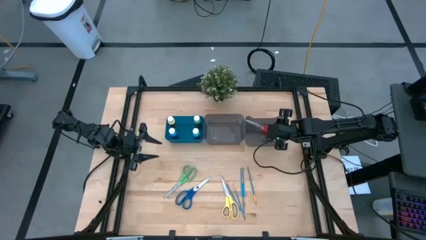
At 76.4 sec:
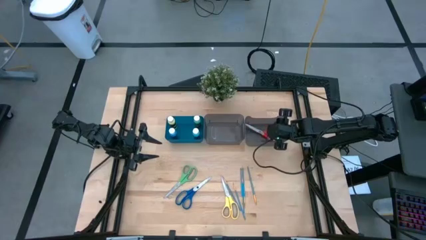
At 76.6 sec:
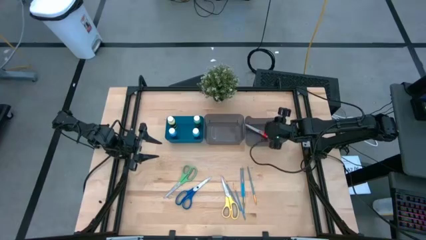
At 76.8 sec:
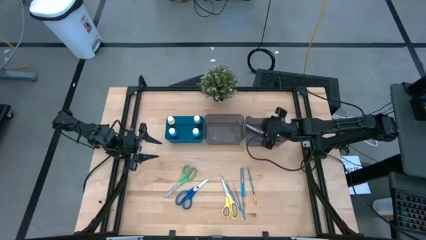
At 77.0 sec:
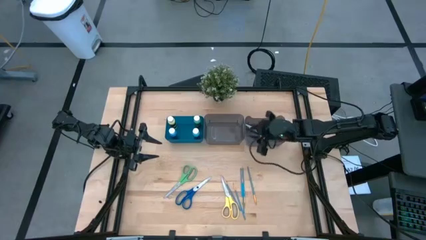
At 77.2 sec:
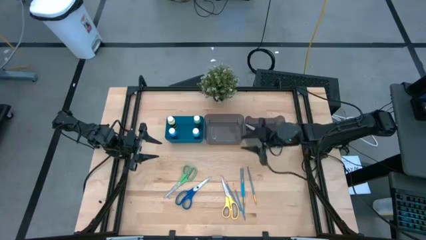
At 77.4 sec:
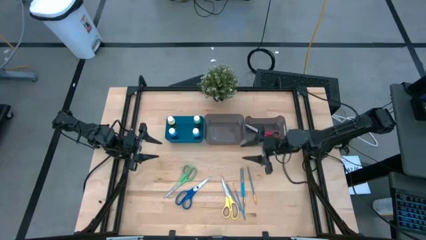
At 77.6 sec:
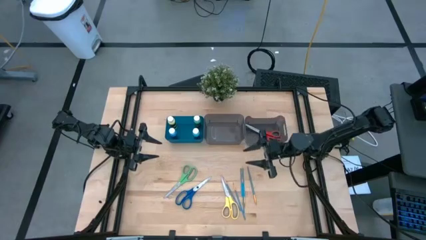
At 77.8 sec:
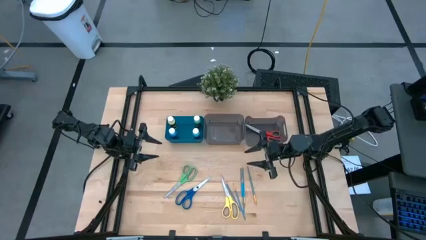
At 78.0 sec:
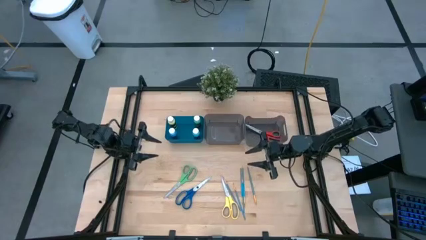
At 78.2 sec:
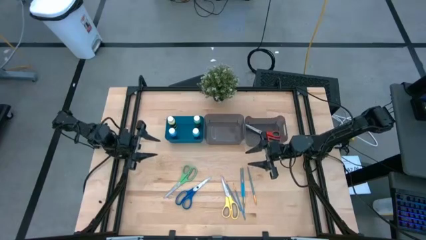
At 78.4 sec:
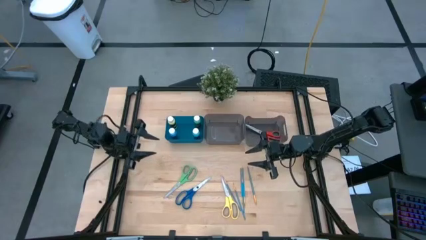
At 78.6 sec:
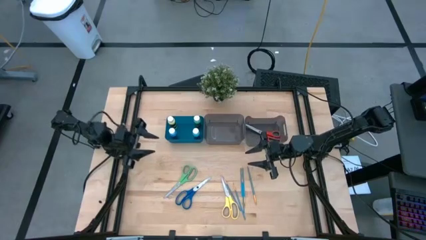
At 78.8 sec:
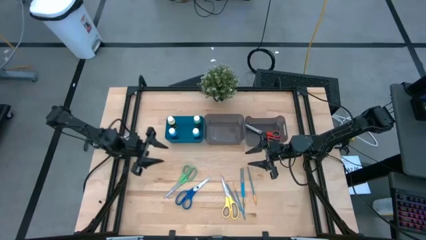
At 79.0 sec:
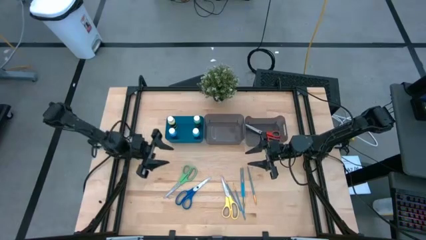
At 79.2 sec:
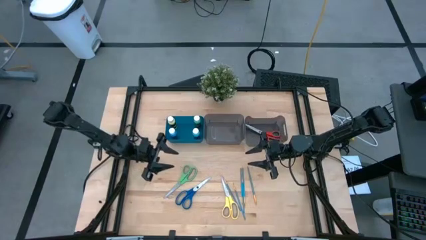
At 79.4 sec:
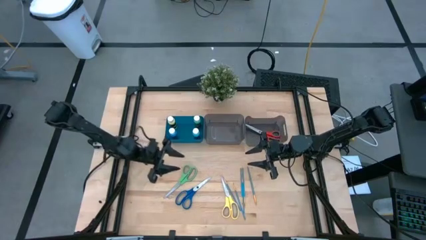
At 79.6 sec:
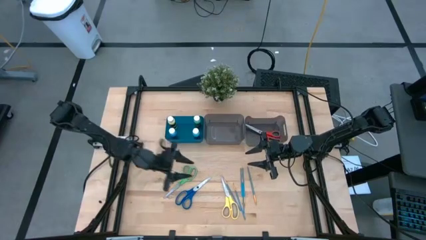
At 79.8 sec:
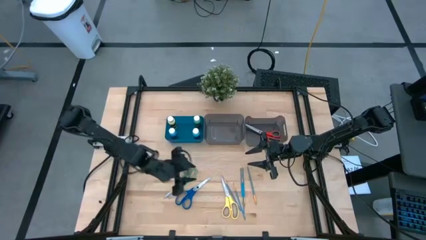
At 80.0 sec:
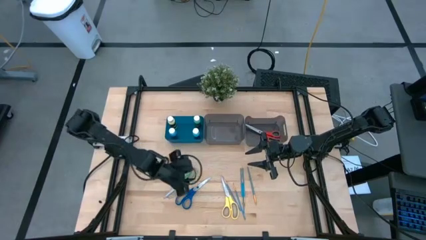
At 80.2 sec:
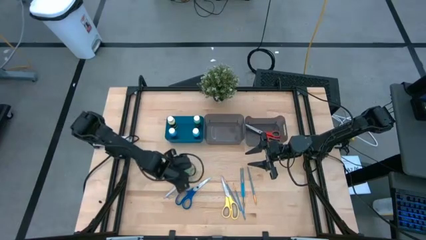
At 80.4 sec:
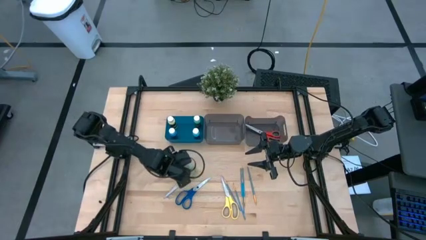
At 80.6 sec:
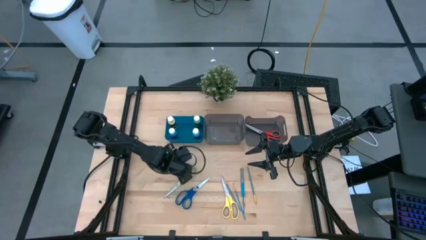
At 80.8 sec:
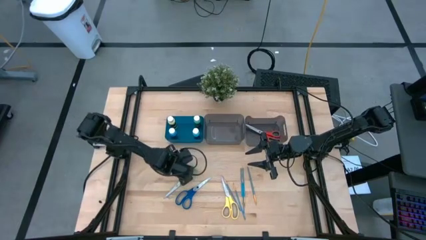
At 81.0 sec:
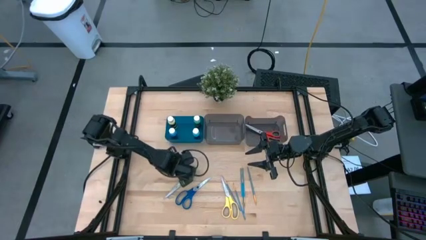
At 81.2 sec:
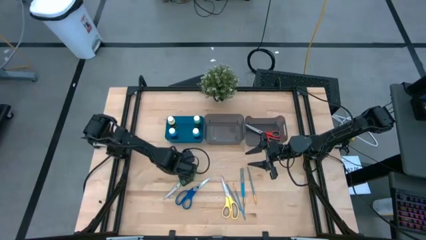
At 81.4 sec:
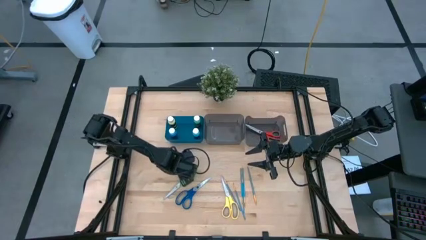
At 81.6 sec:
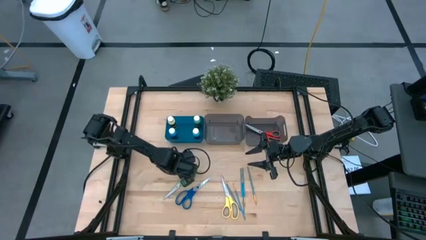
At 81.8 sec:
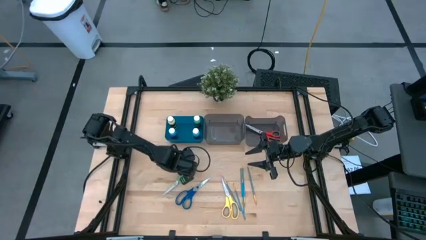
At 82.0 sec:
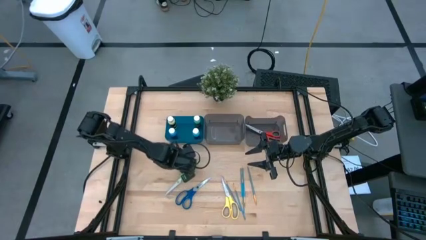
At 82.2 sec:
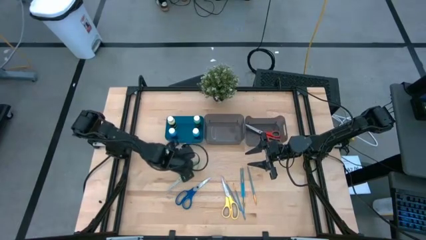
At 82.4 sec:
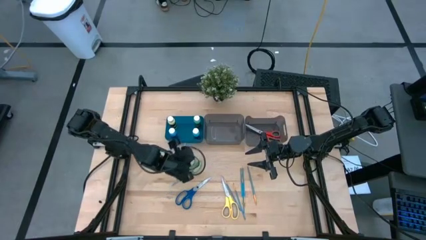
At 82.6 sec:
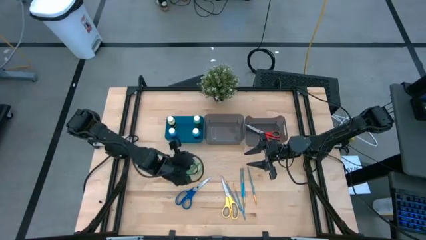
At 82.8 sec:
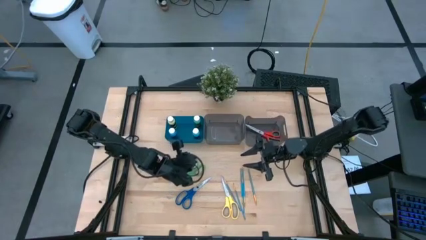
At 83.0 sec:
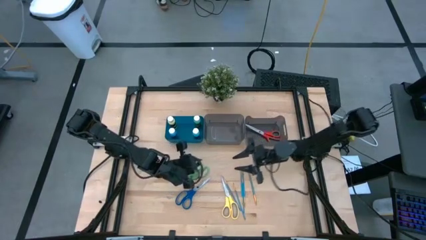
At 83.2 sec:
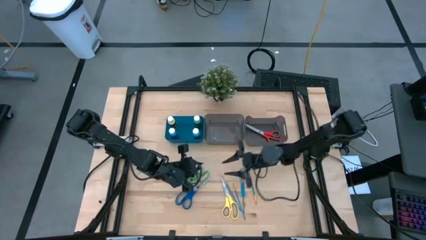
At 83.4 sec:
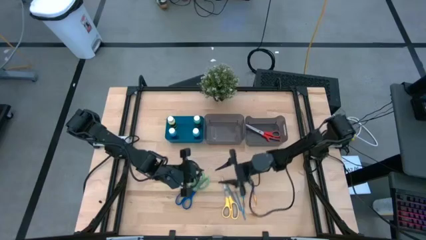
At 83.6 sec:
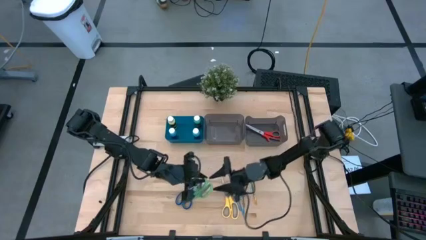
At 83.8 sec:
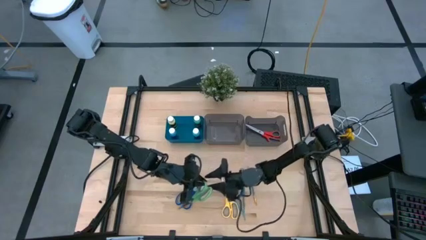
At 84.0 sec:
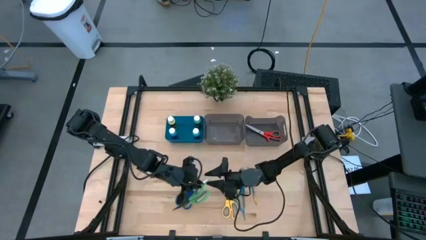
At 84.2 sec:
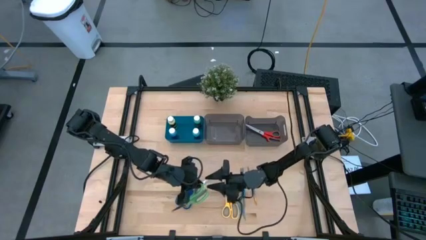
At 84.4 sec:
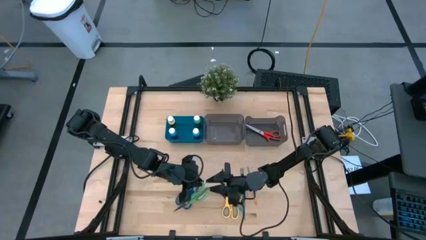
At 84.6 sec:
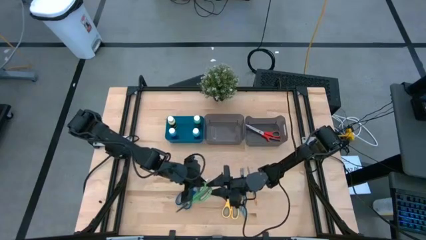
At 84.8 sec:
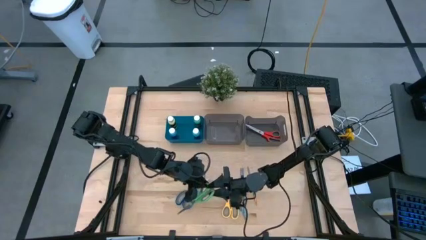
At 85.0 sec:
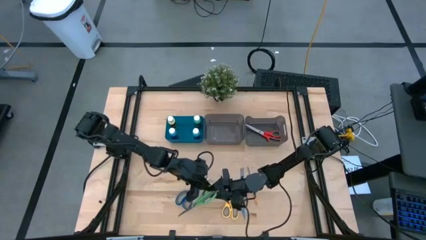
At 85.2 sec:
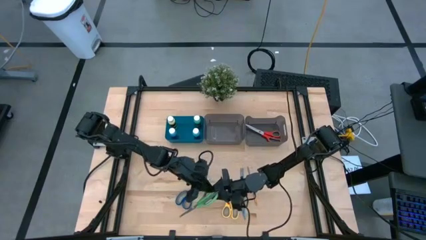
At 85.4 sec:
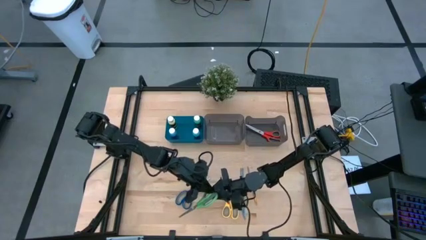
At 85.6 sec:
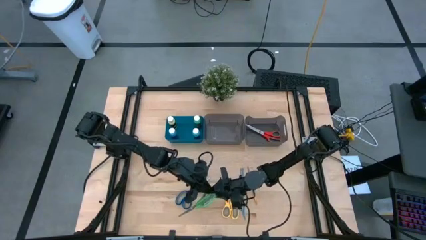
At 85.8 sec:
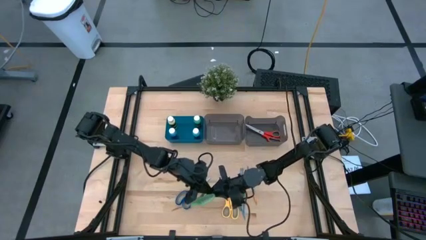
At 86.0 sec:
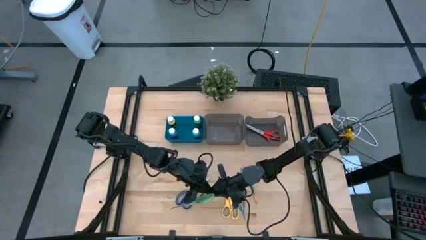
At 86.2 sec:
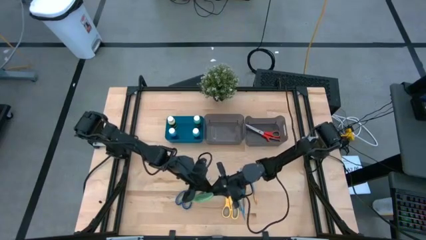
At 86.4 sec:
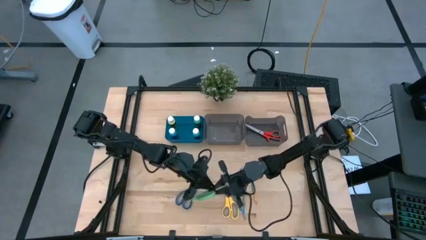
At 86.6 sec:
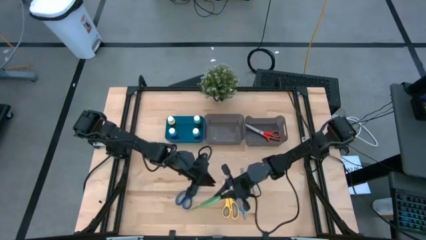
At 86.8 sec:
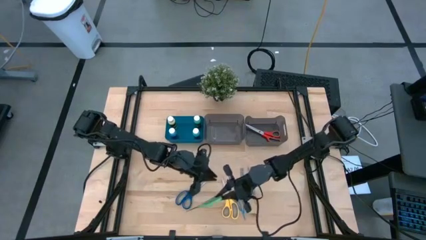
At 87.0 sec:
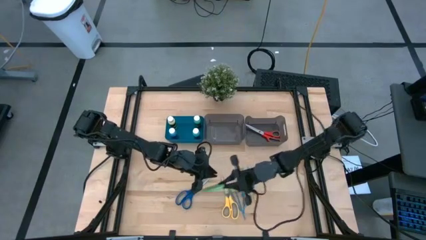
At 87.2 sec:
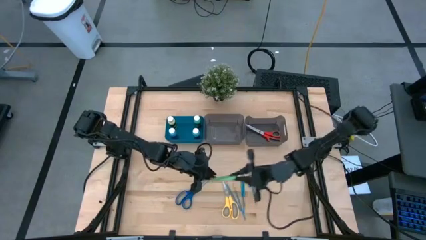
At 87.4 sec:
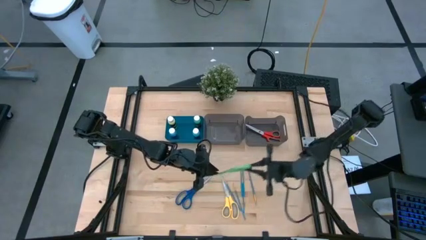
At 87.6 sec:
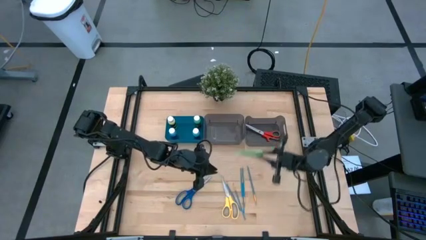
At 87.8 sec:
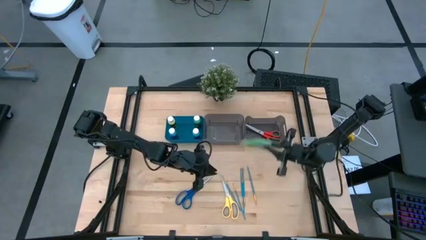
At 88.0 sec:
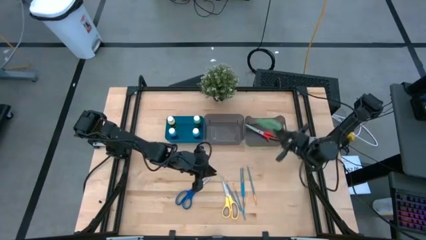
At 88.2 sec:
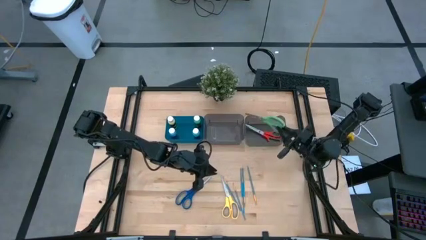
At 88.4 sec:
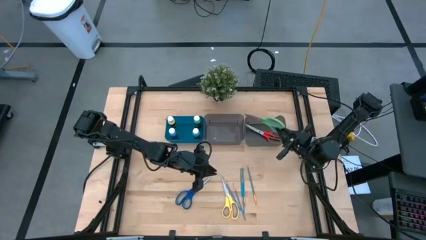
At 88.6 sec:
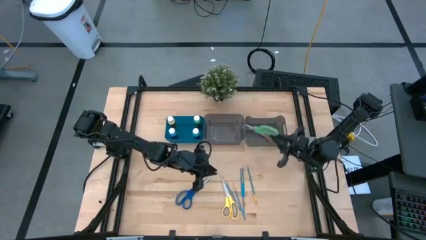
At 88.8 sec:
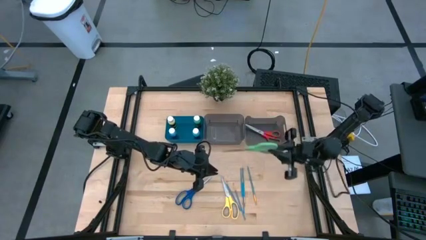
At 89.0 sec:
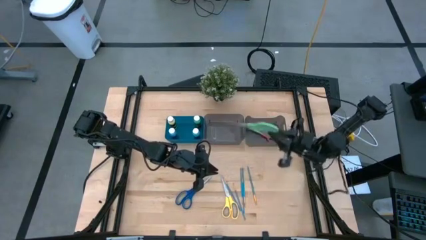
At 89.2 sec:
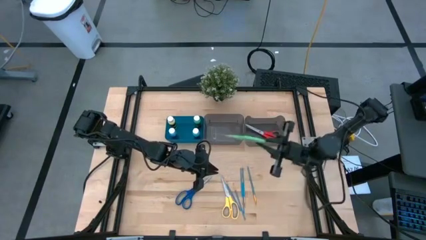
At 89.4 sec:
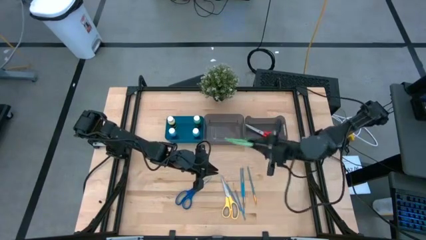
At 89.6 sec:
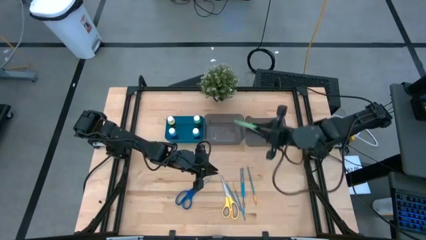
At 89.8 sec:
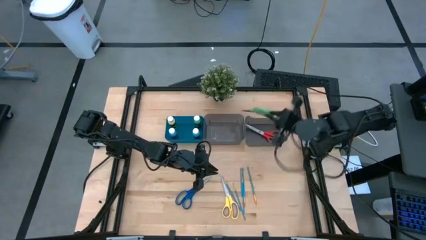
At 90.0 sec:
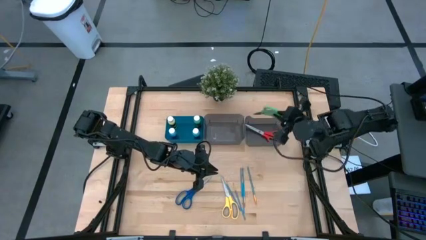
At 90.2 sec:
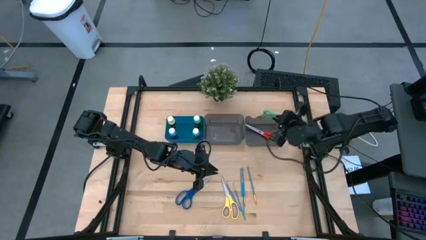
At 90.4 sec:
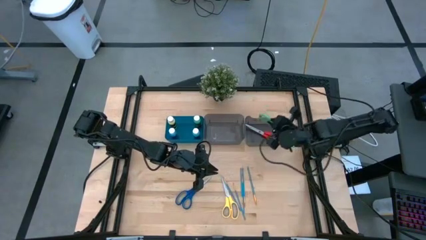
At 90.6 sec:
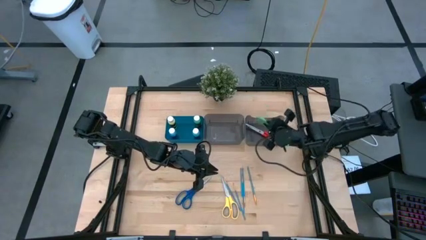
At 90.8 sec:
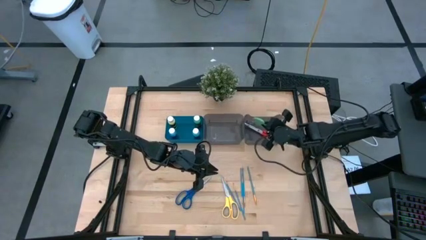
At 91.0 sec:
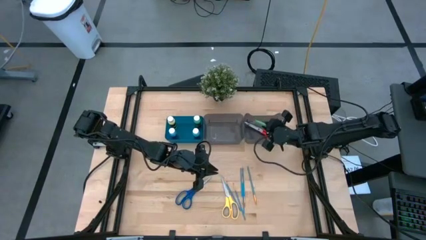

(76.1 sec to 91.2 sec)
Task: Pick & Place Paint Supplies
Put the green scissor into the right black bin
